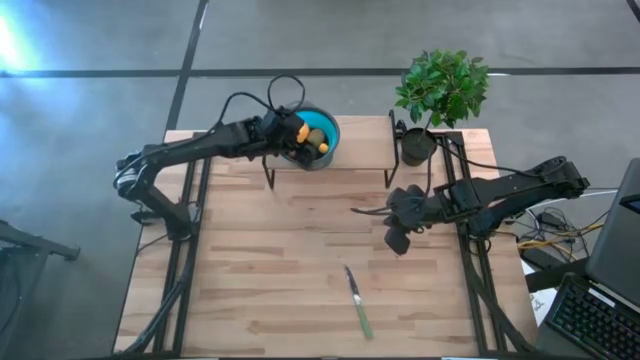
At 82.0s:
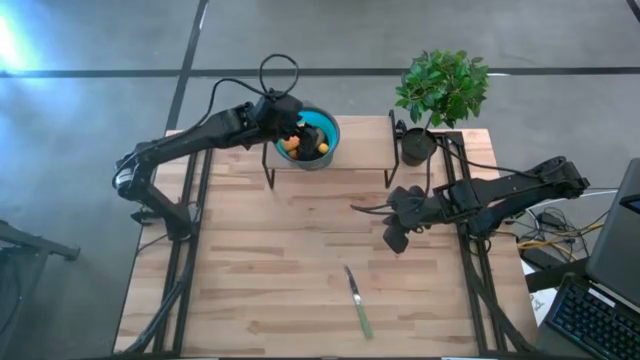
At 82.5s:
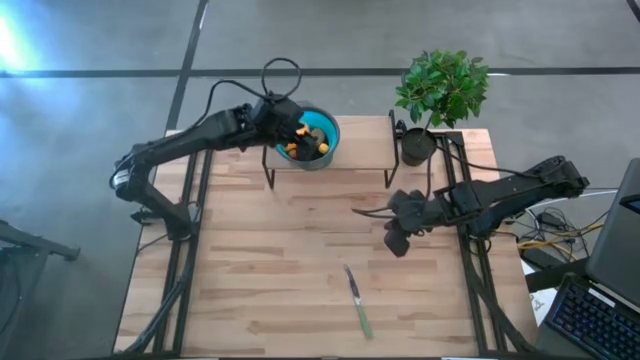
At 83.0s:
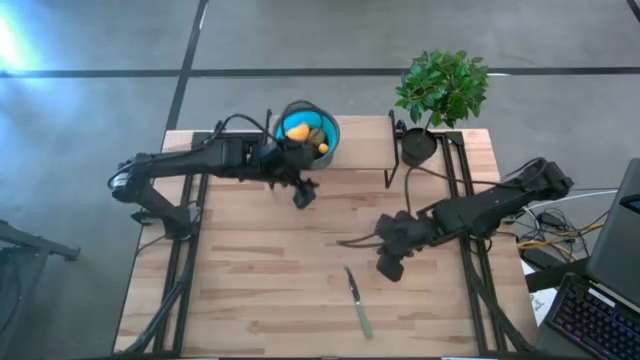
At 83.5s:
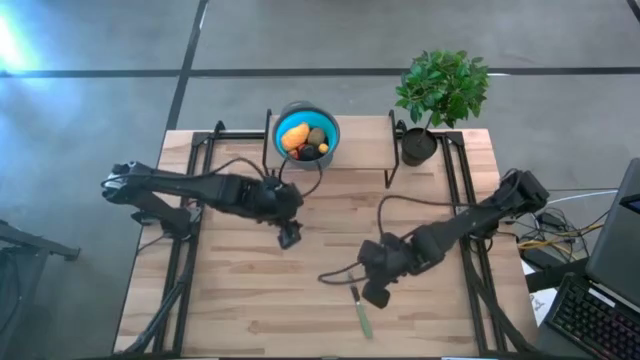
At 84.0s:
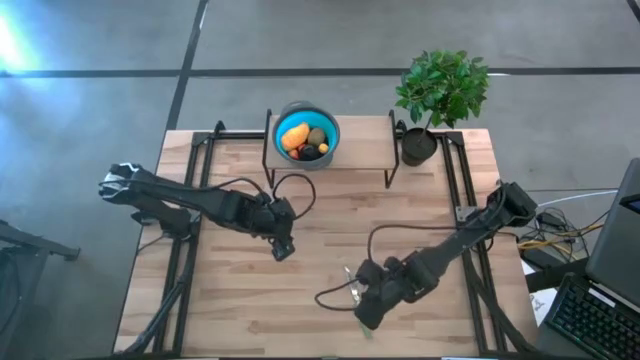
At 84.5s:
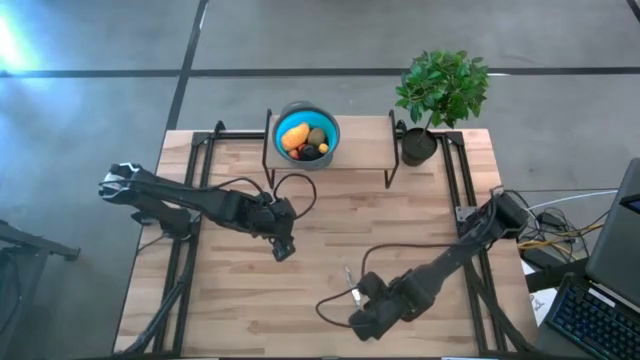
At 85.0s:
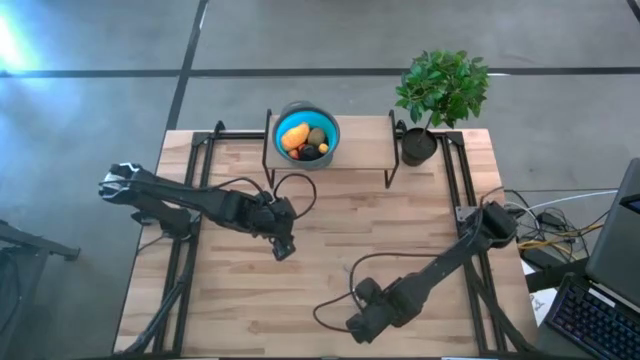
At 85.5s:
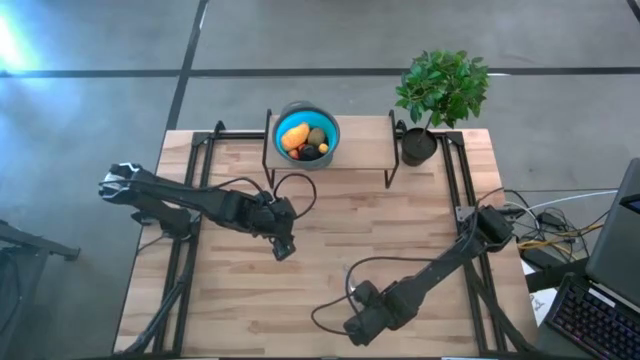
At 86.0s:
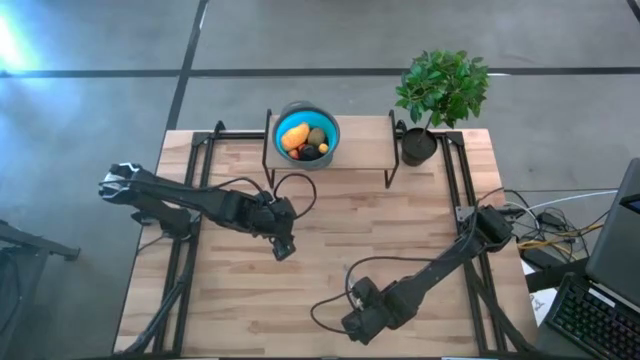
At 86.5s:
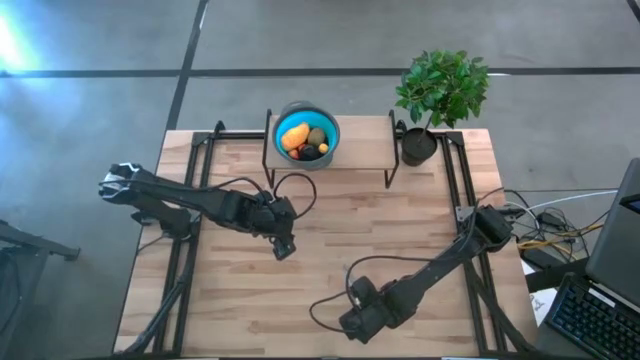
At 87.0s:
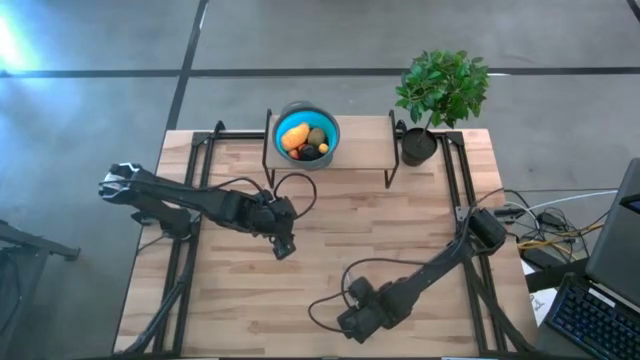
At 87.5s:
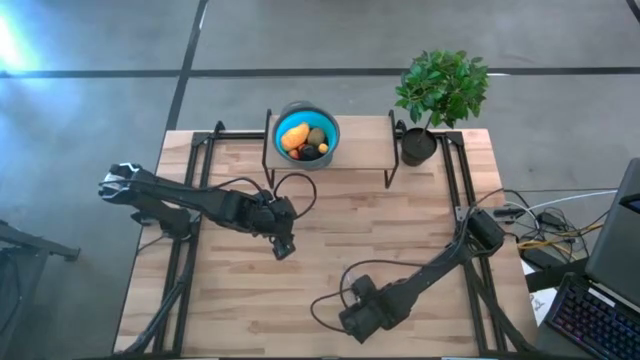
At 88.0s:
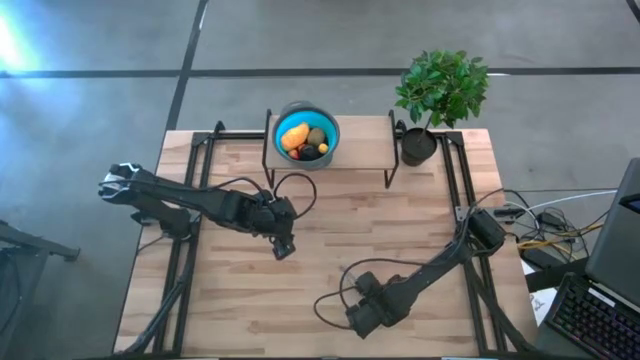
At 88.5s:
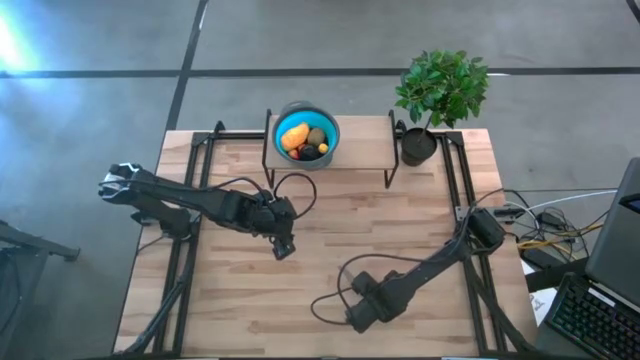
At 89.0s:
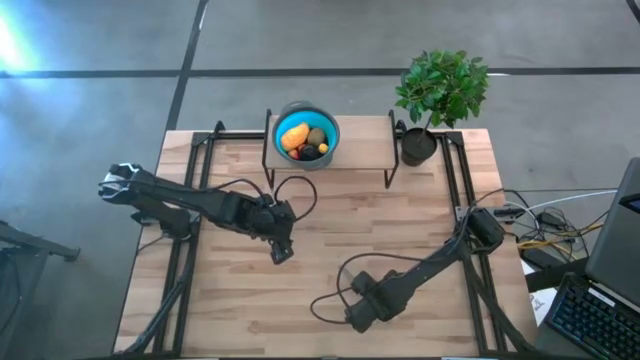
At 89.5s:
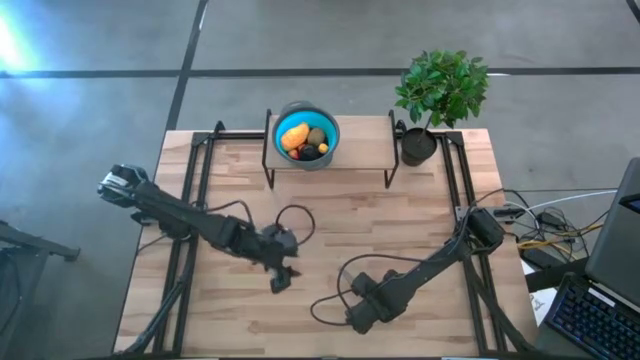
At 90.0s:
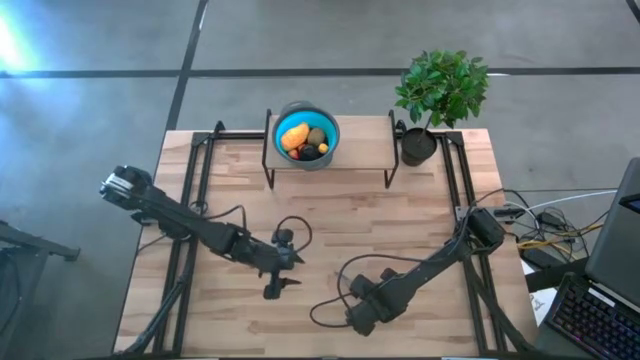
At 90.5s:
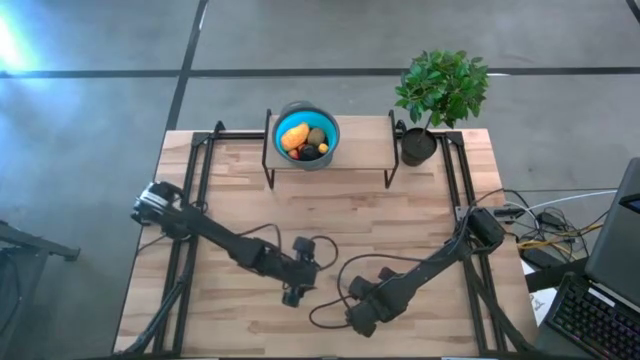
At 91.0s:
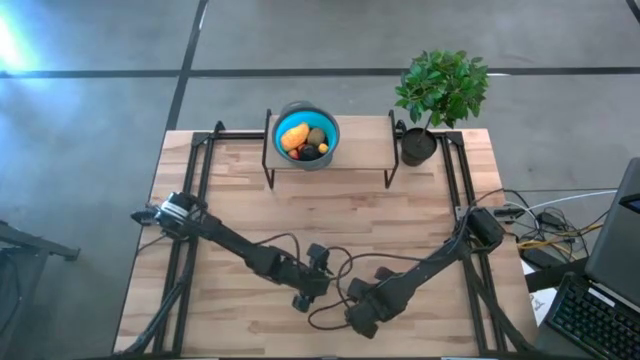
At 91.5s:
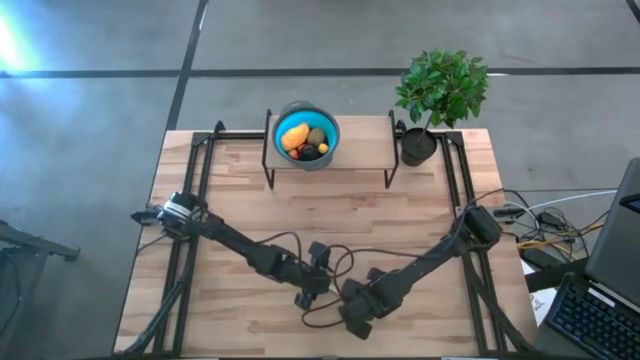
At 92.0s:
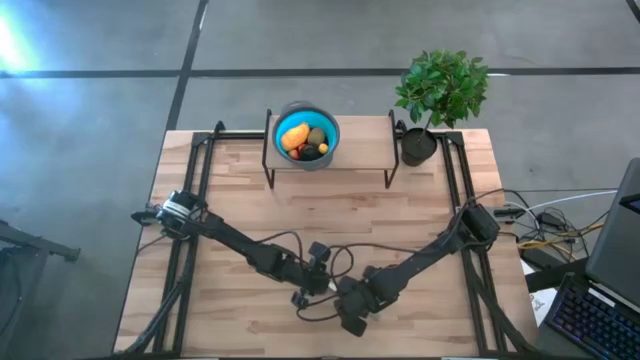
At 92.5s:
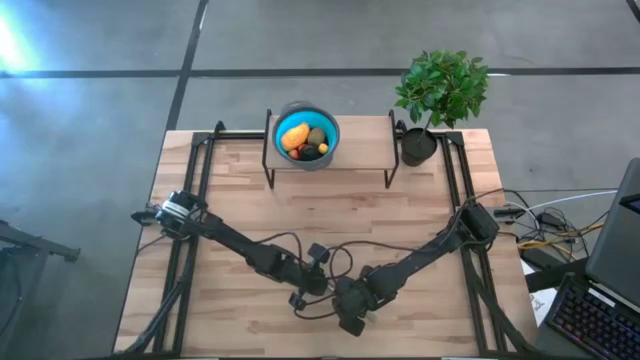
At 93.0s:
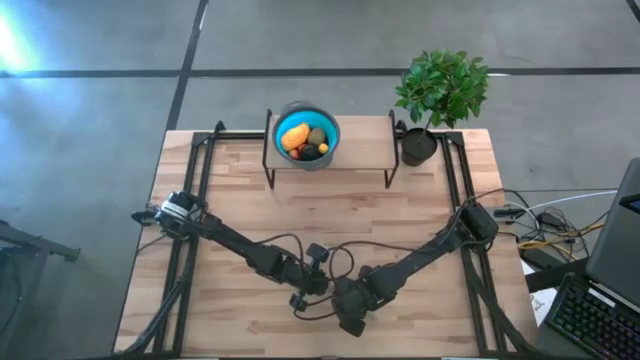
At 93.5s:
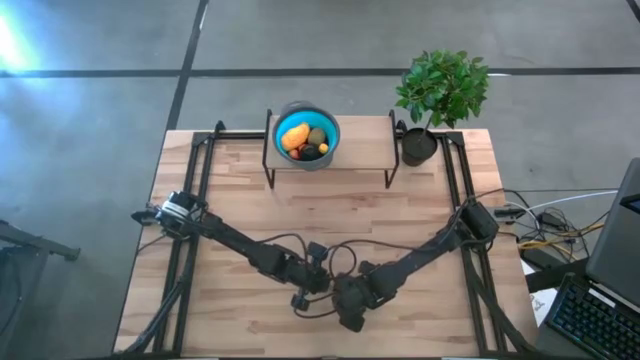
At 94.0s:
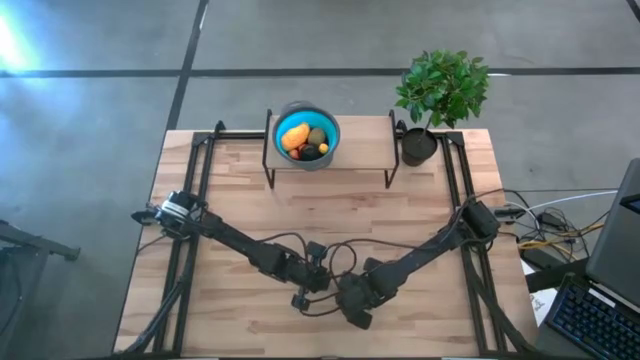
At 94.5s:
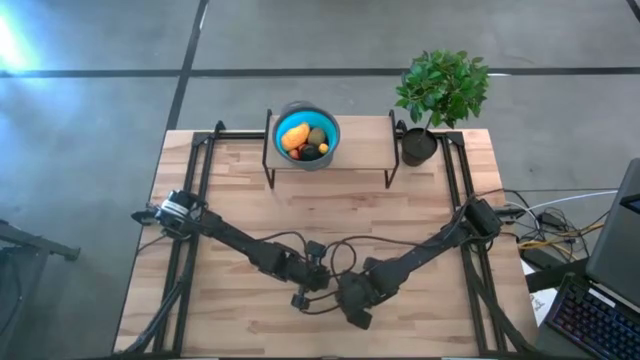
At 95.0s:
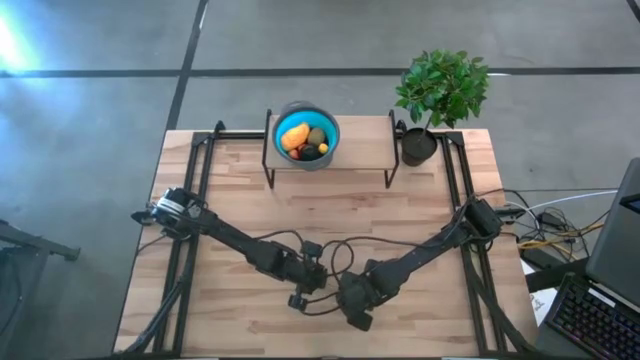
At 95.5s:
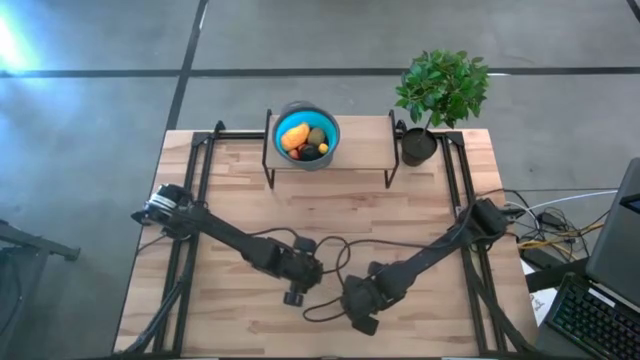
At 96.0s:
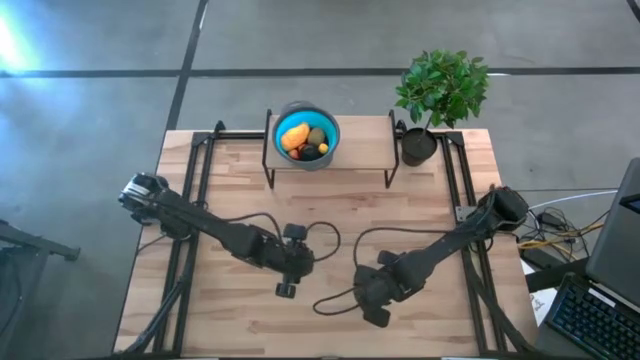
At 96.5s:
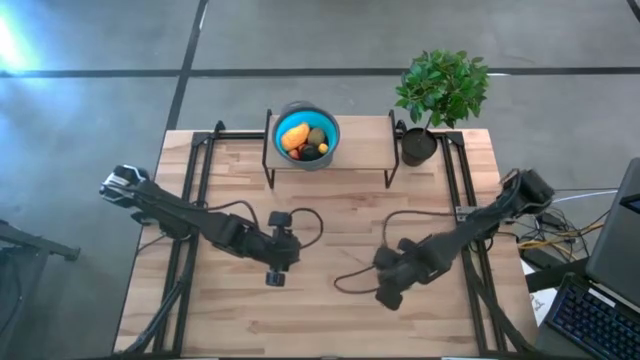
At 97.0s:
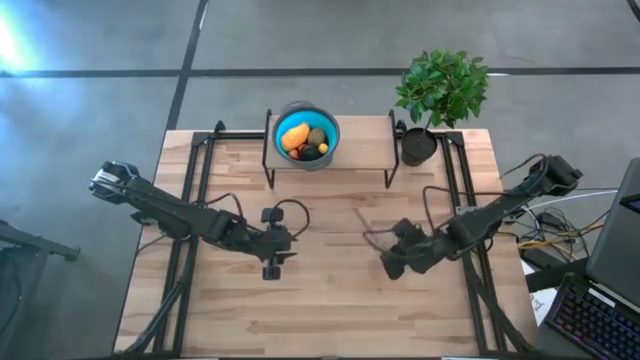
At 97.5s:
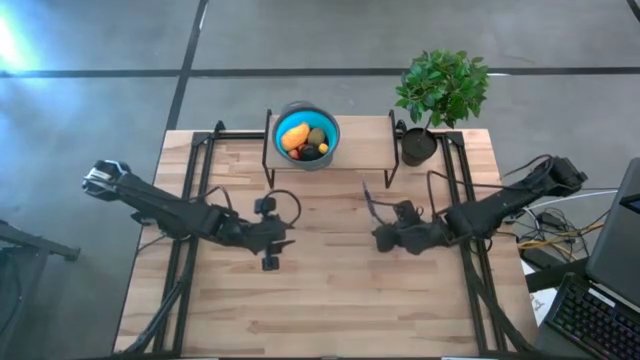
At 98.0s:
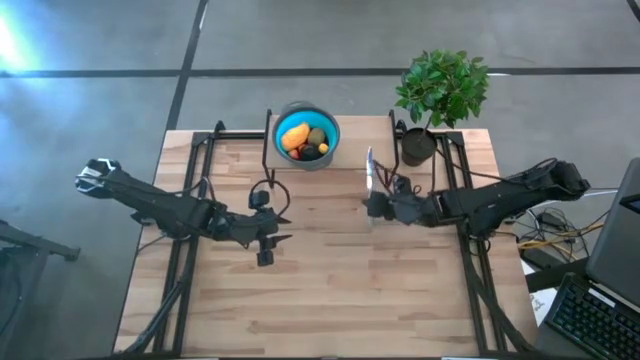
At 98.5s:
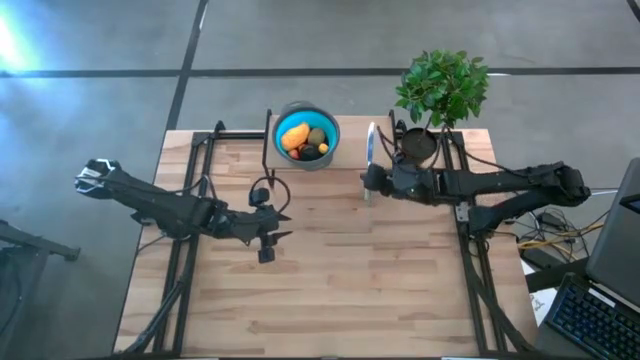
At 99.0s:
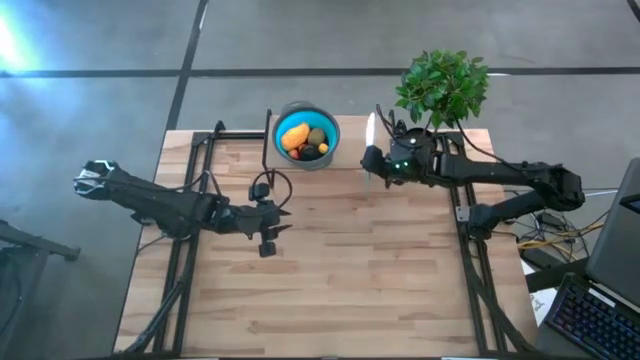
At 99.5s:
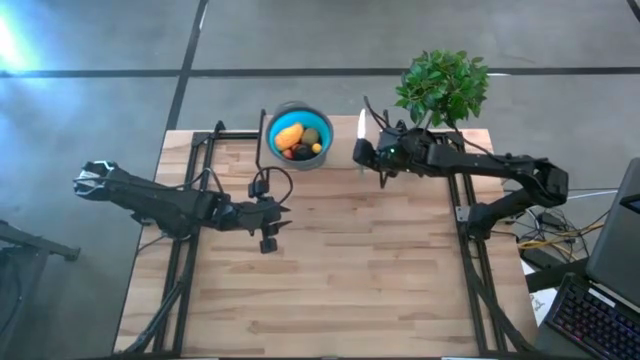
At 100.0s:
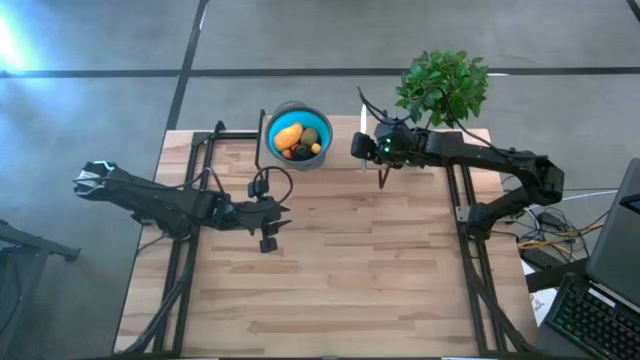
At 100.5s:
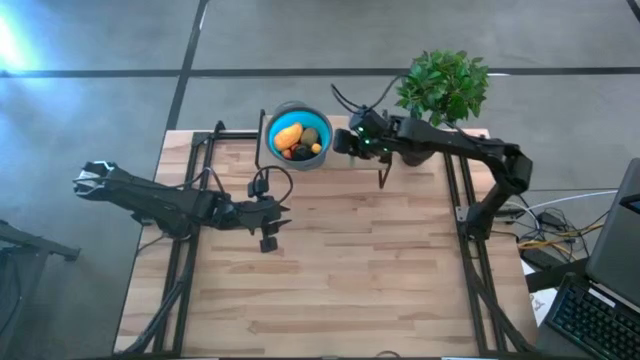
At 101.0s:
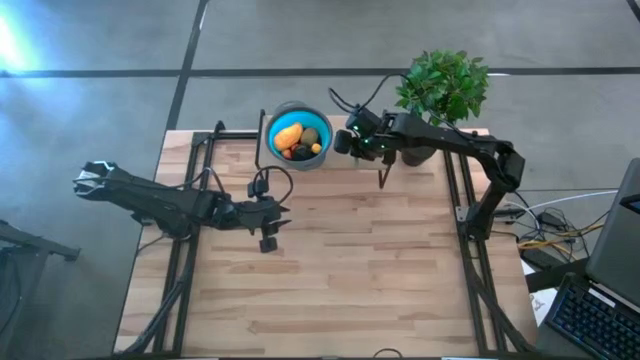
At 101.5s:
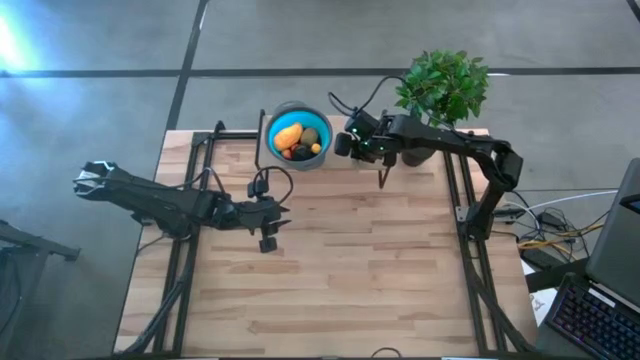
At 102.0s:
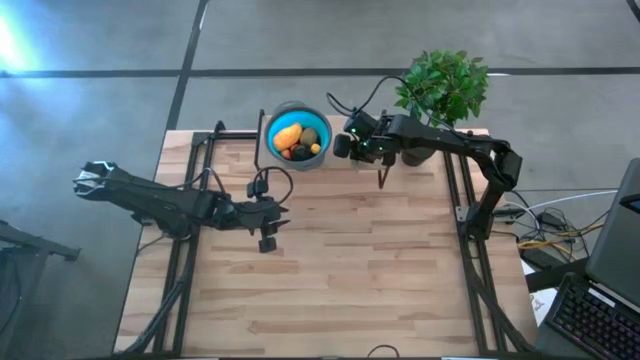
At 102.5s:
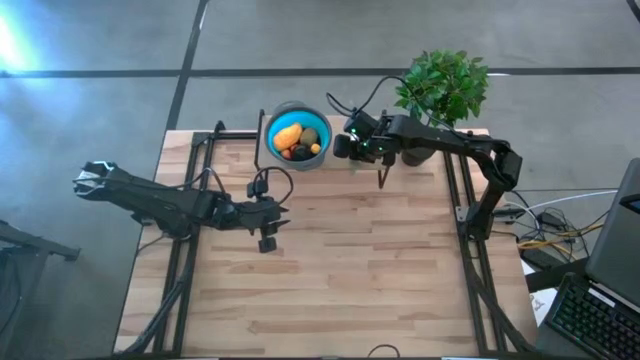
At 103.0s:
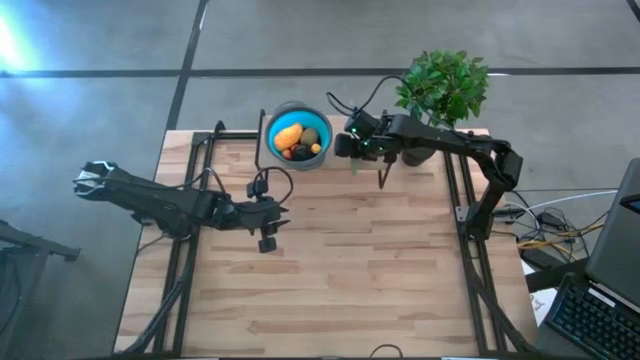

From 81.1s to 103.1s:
Task: Pick & Place Fruit
Put the green knife on the shelf
